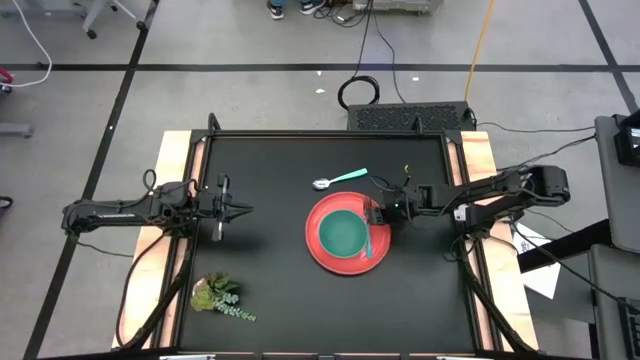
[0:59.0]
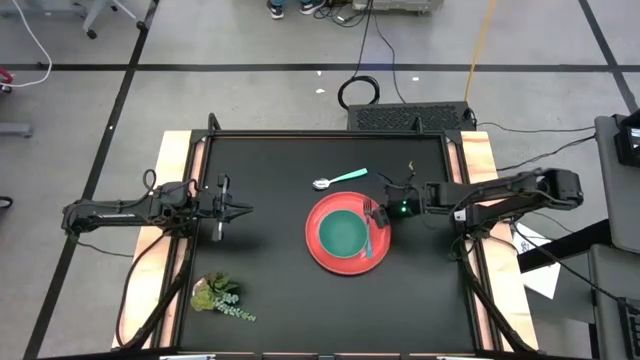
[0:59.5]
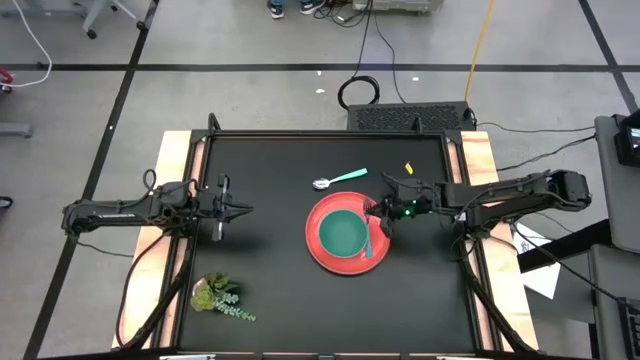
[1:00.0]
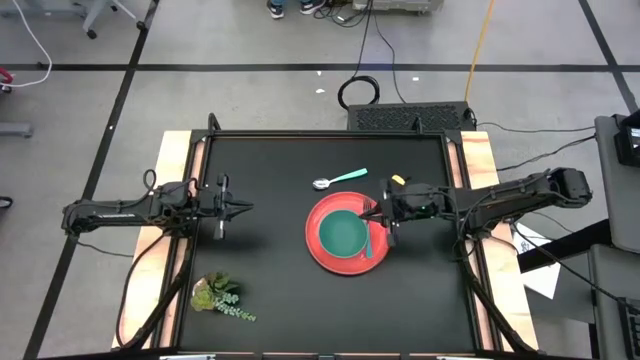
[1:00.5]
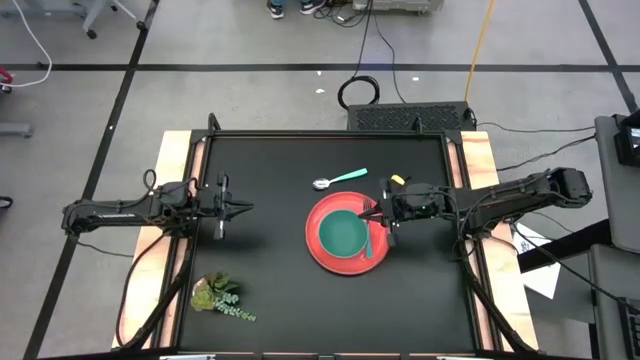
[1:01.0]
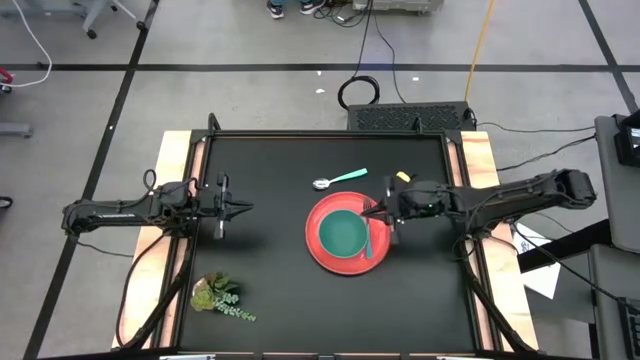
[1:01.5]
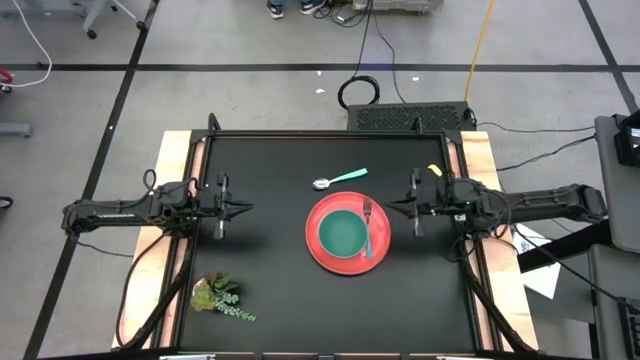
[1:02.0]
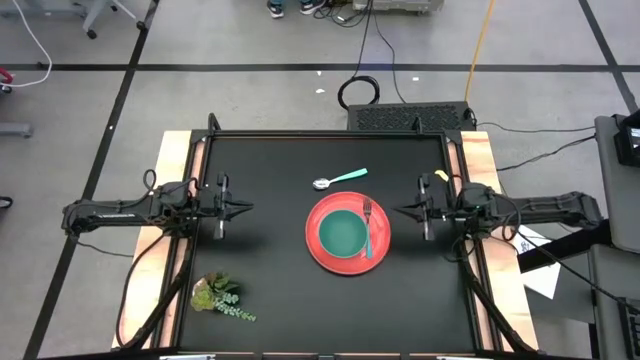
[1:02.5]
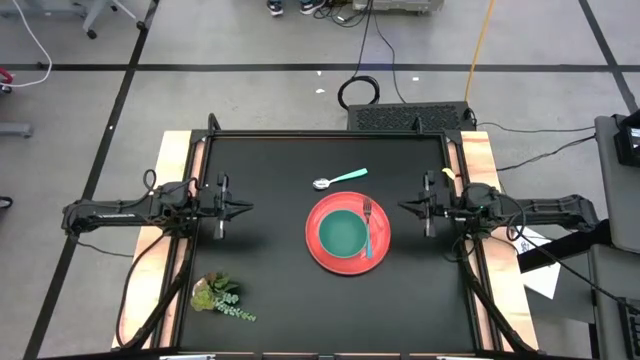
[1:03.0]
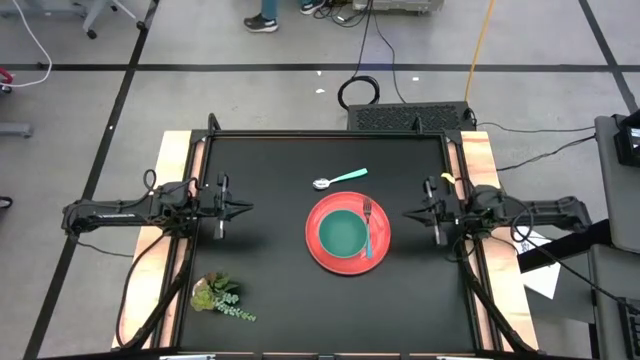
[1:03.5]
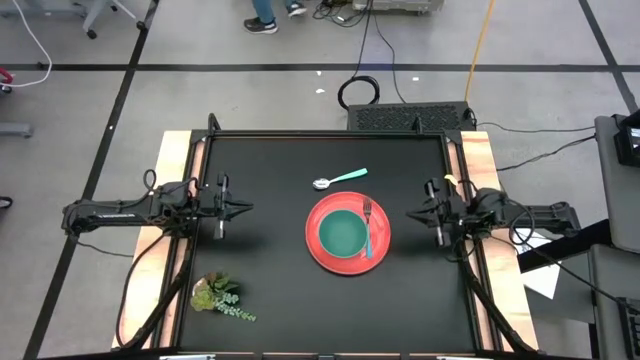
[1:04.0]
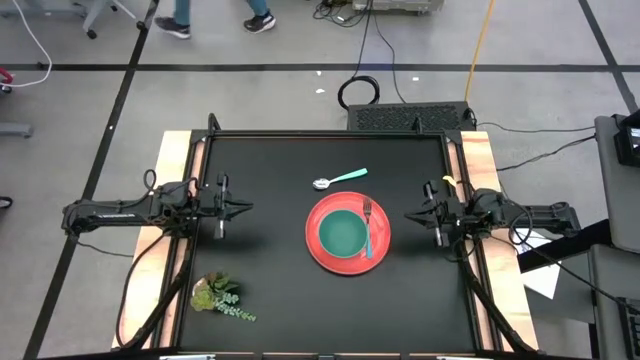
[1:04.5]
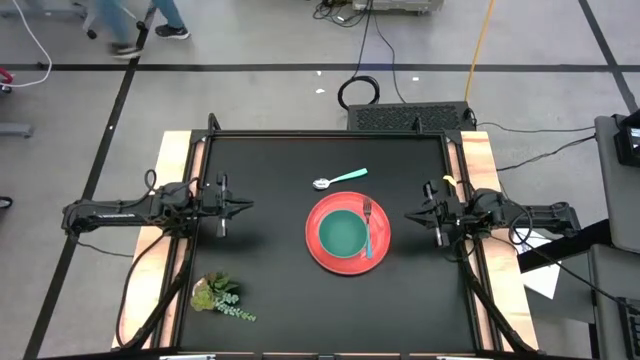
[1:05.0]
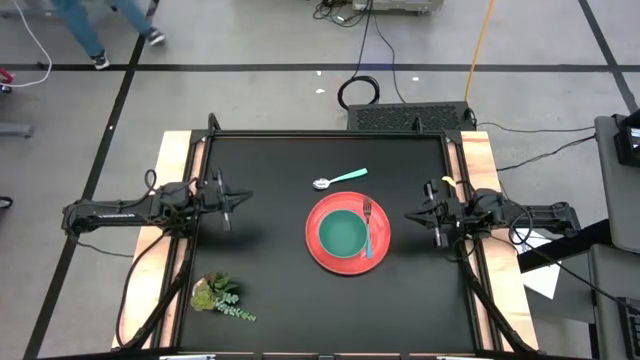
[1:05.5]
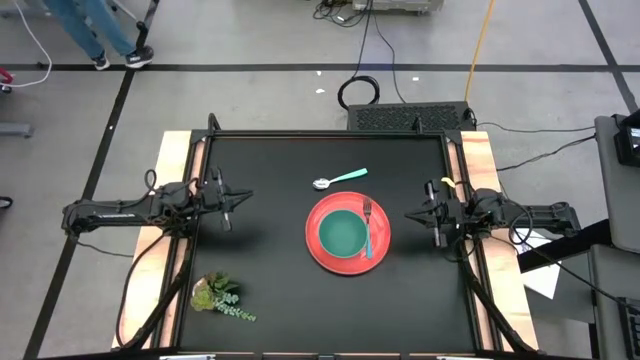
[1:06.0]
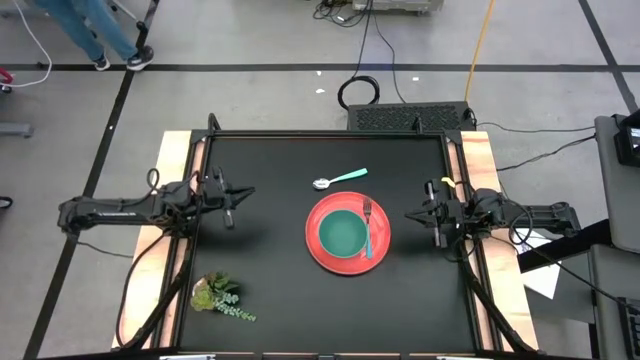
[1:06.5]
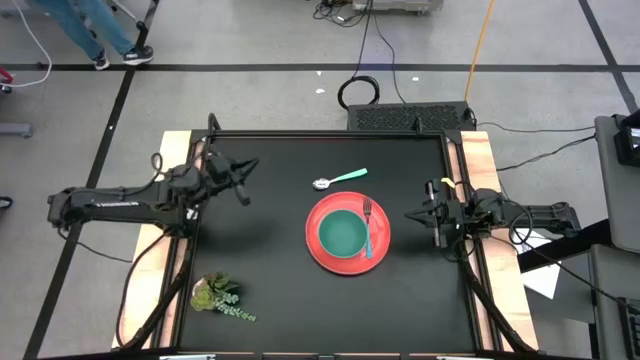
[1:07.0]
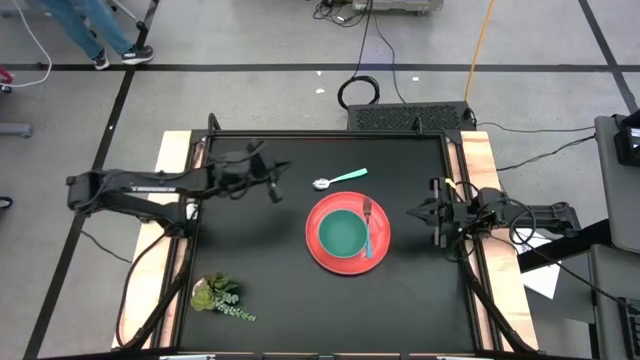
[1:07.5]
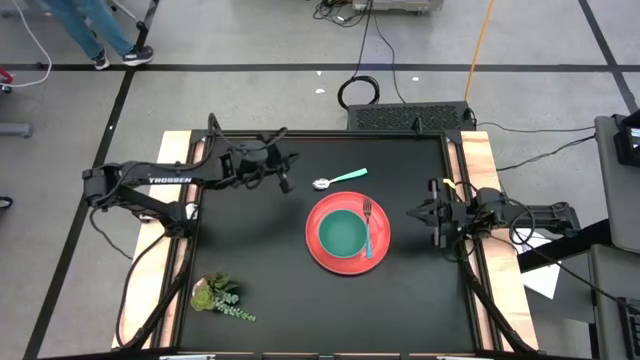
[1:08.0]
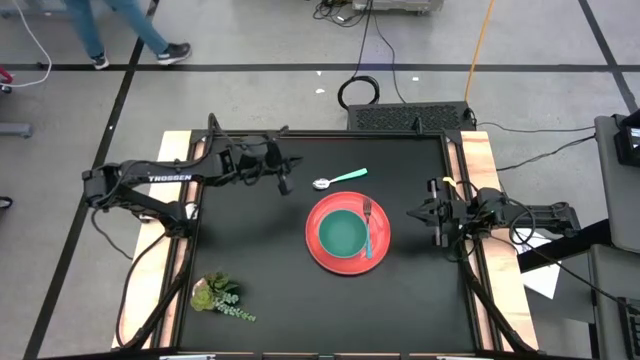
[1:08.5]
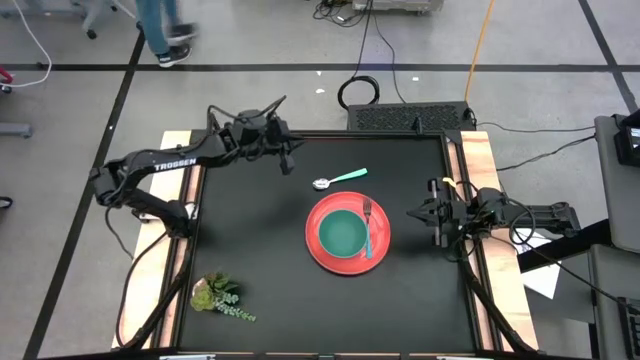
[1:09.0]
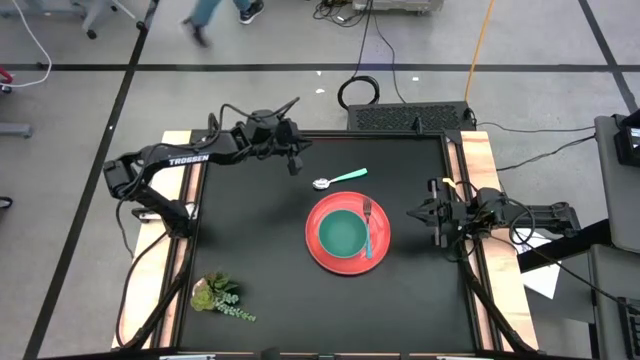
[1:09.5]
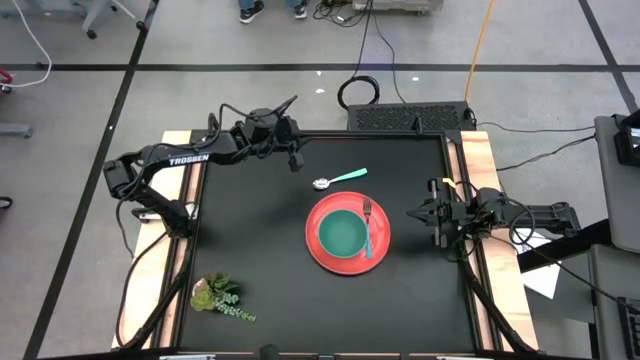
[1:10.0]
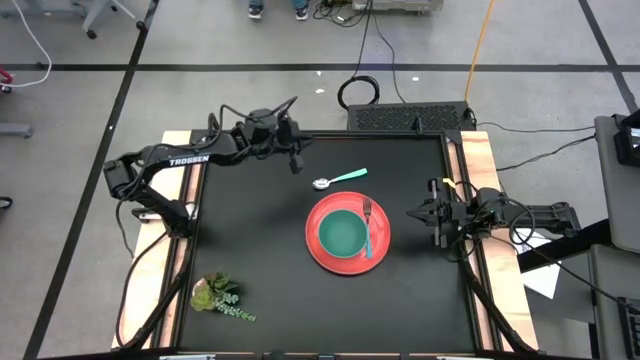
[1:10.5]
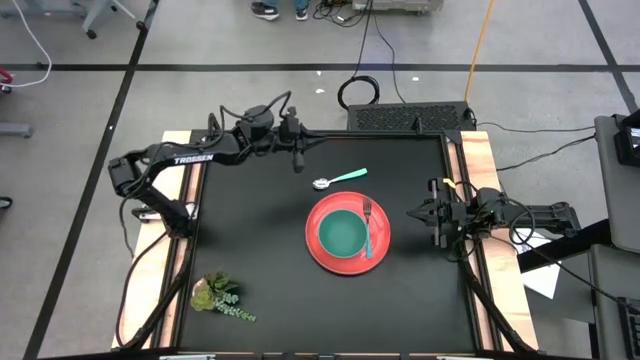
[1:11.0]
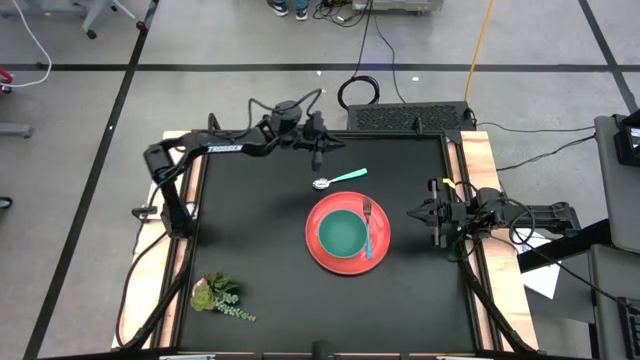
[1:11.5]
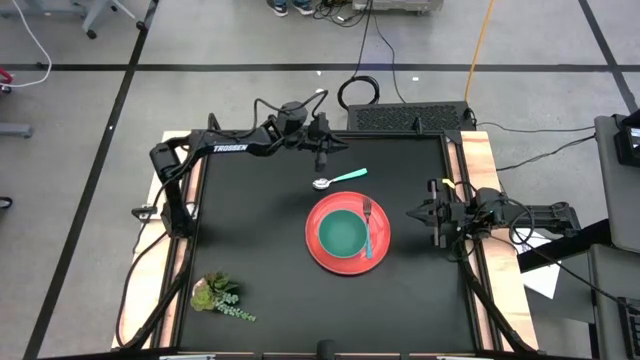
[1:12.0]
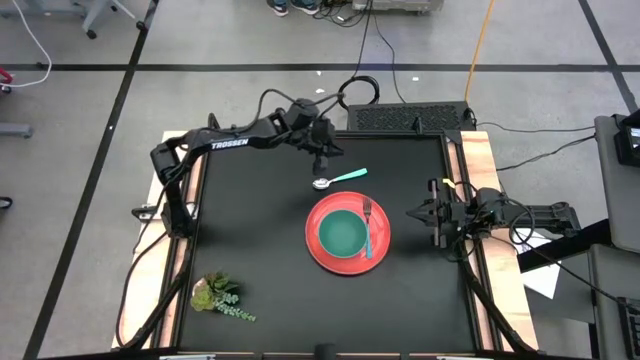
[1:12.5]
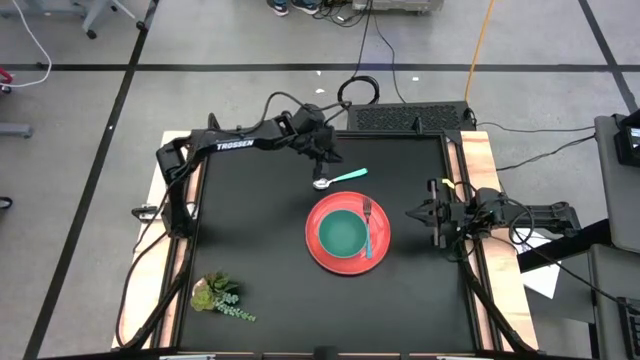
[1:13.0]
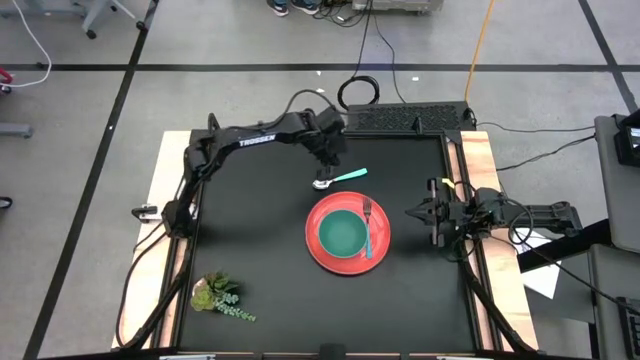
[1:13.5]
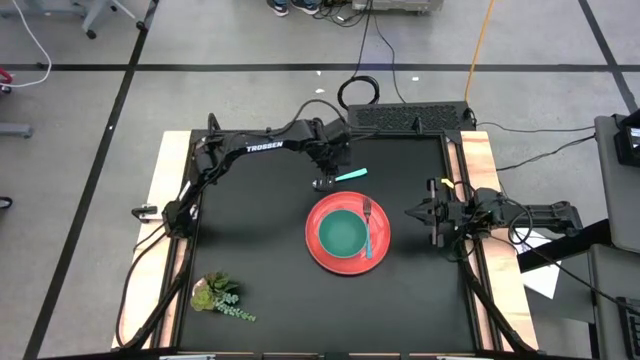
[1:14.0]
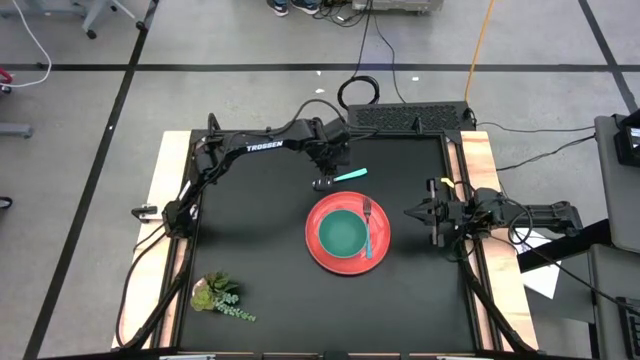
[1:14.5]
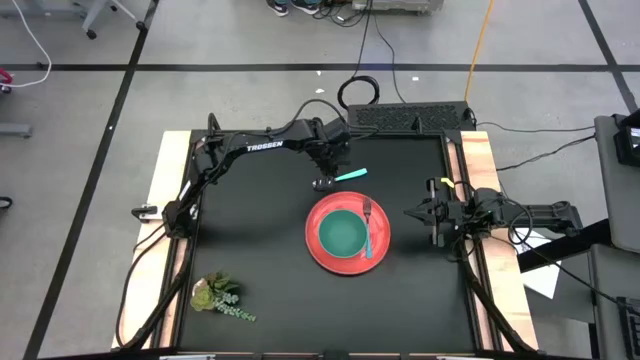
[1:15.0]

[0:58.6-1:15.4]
Task: Set table place
Put the blue spoon into the green bowl

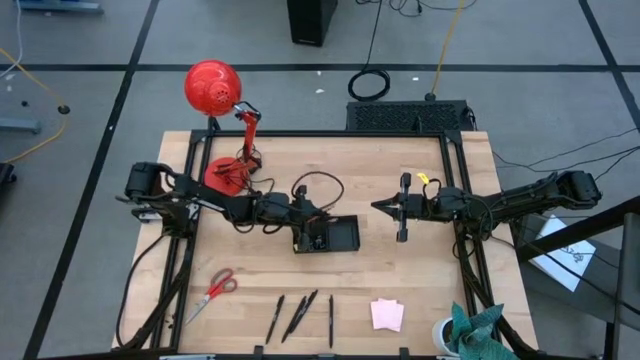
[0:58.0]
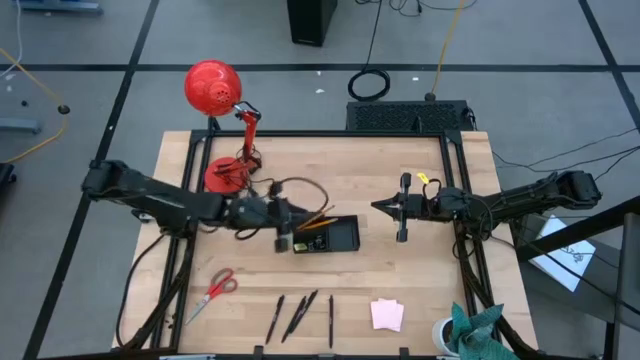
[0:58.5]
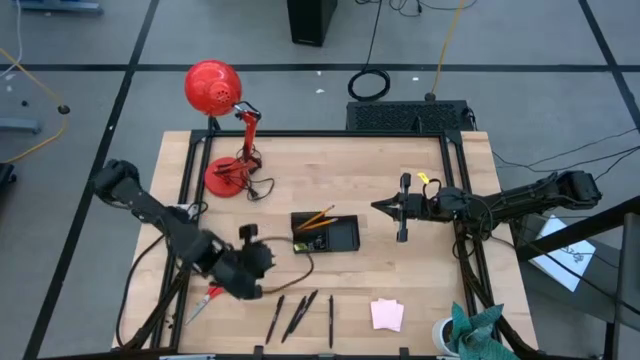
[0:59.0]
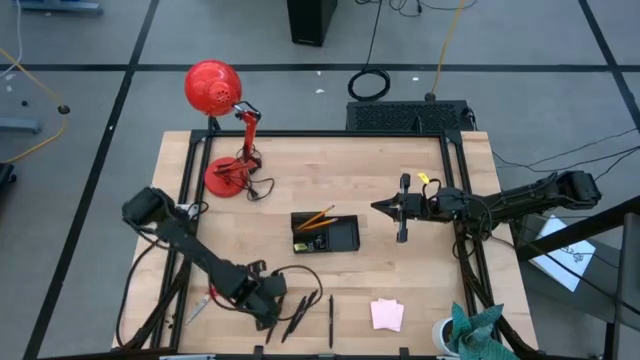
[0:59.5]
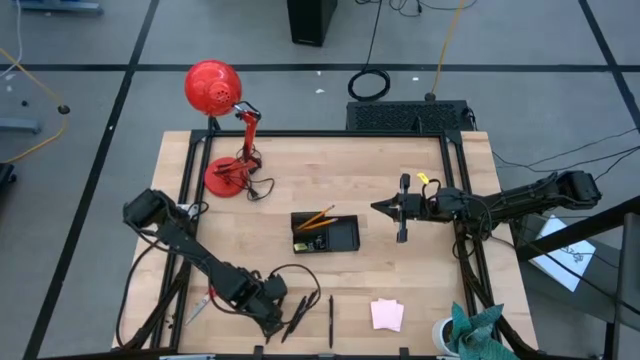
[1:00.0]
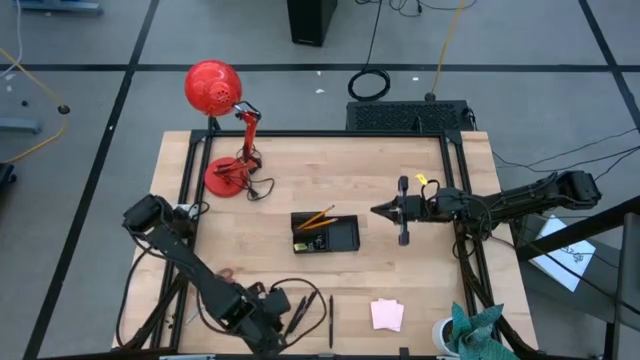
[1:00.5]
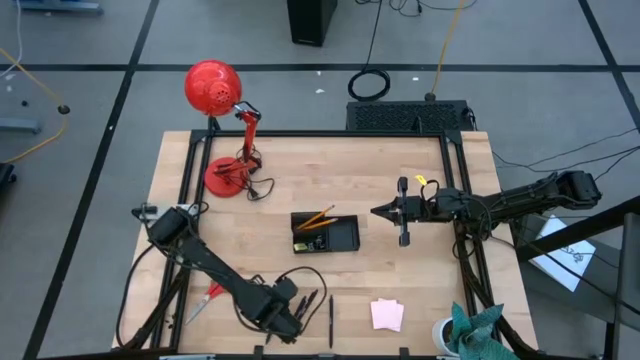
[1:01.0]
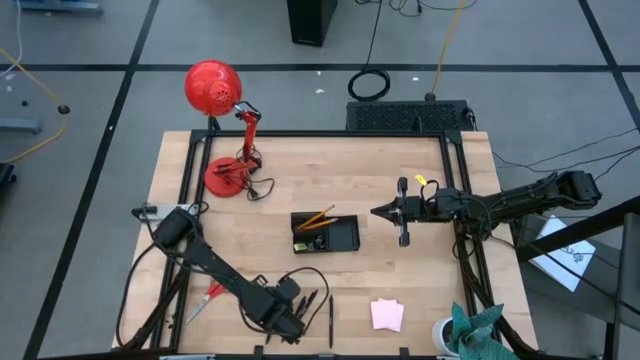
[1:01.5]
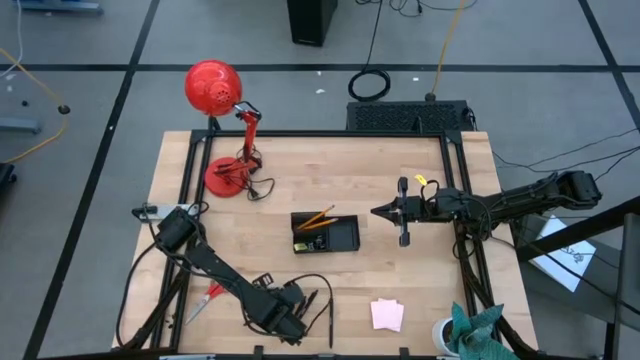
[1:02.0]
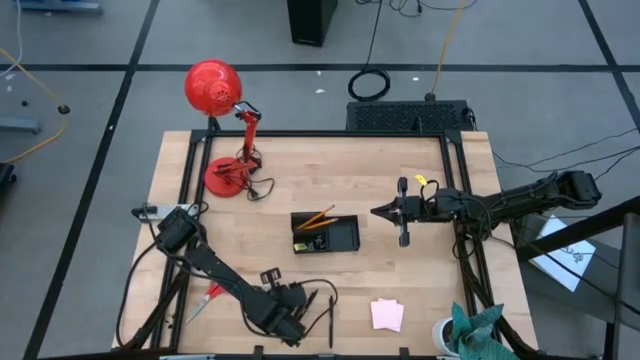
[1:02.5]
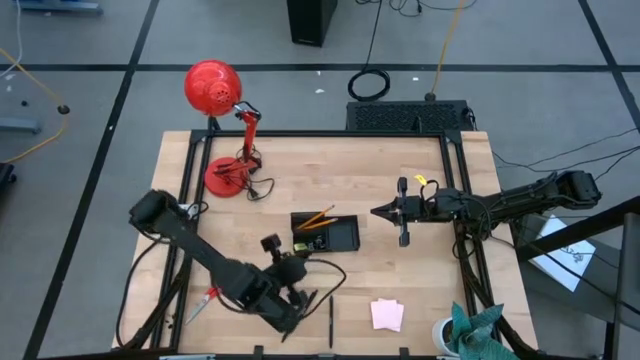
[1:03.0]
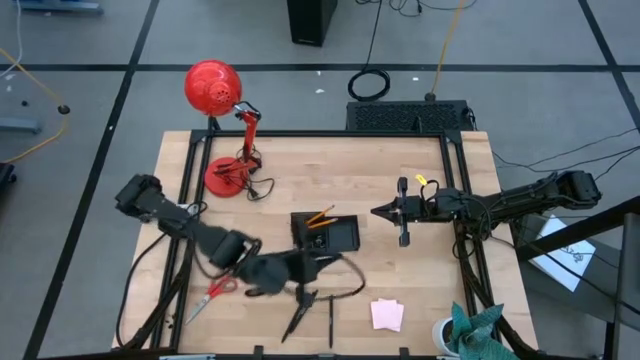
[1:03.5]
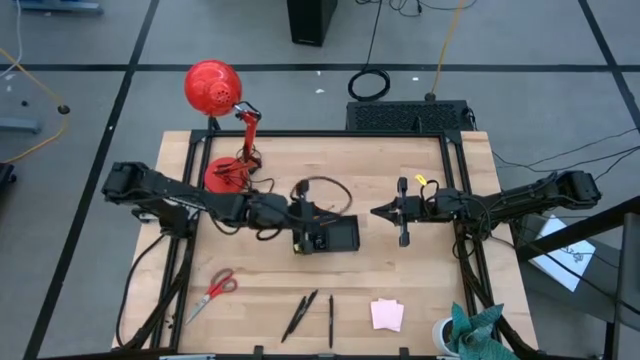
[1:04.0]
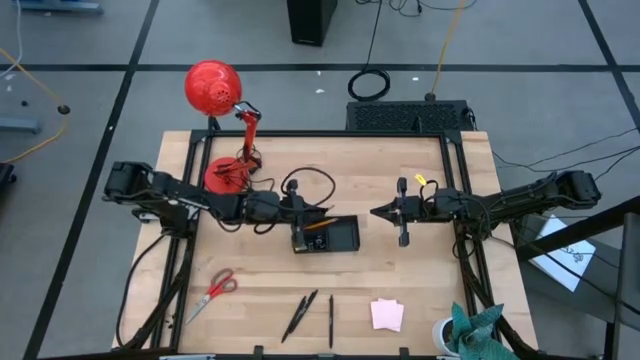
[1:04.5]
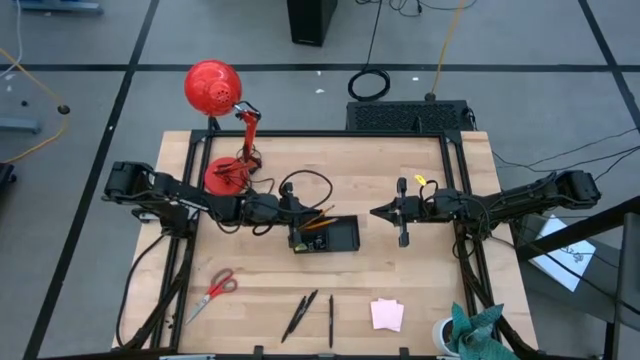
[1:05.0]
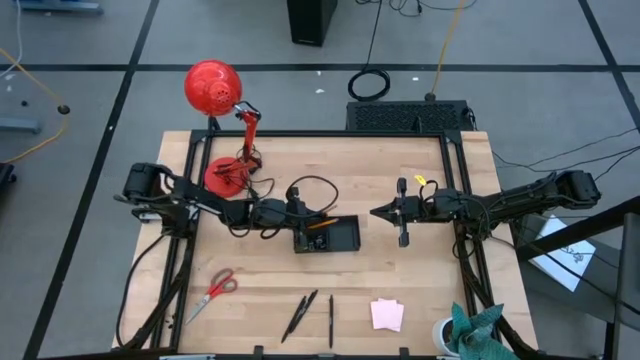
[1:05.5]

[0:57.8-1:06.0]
Task: Pick and place office supplies into organizer
Put the pen into the desk organizer
